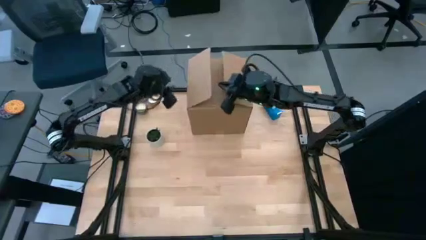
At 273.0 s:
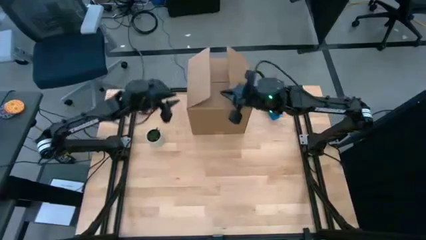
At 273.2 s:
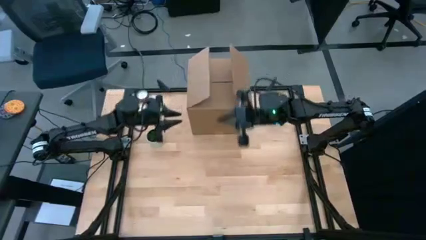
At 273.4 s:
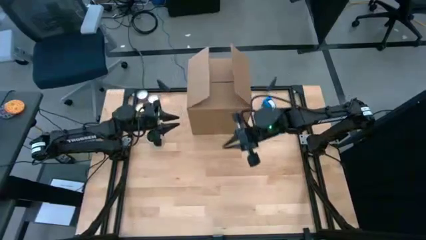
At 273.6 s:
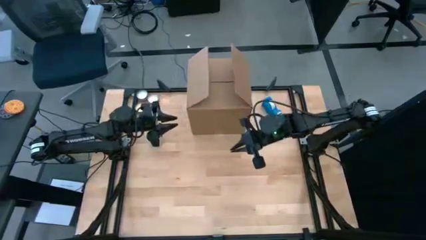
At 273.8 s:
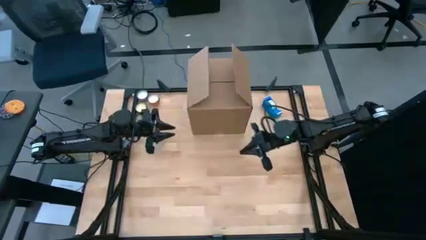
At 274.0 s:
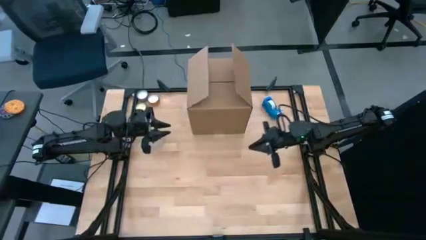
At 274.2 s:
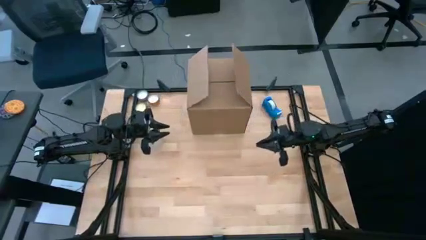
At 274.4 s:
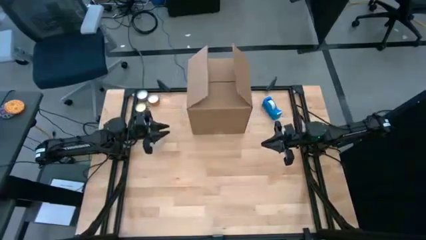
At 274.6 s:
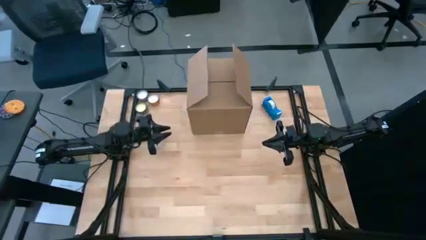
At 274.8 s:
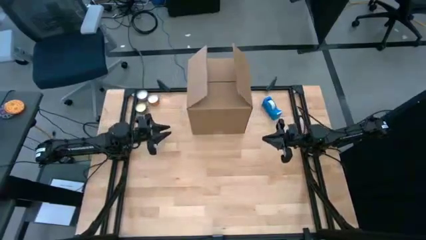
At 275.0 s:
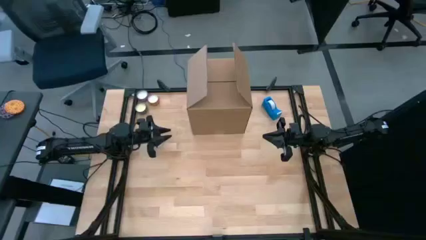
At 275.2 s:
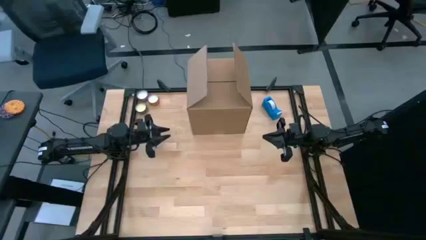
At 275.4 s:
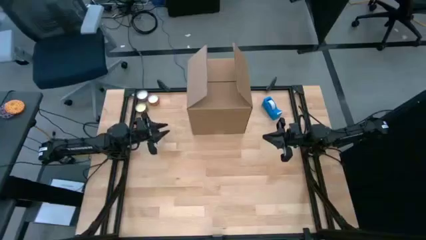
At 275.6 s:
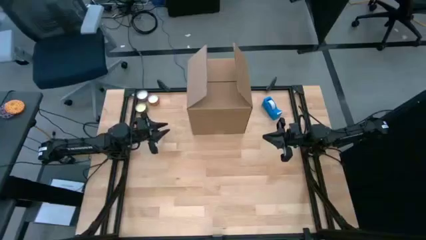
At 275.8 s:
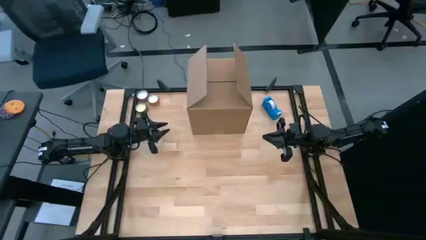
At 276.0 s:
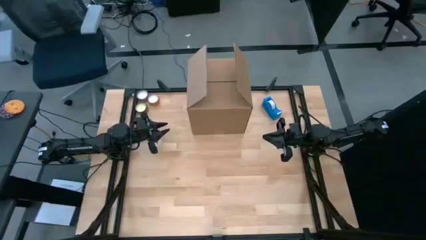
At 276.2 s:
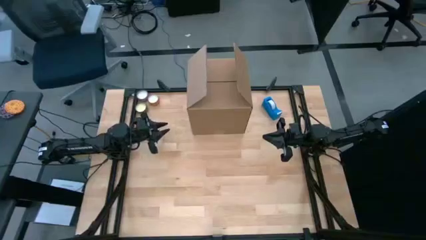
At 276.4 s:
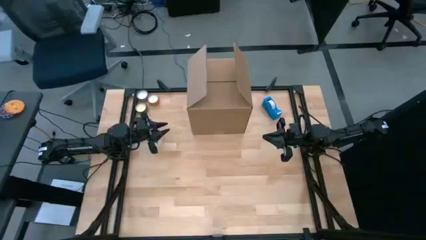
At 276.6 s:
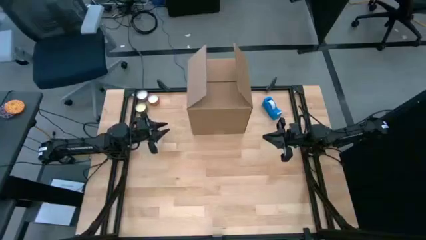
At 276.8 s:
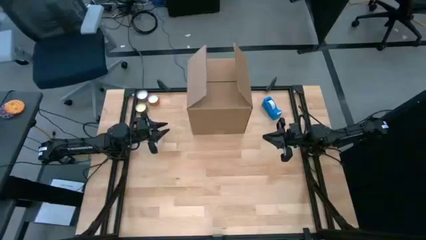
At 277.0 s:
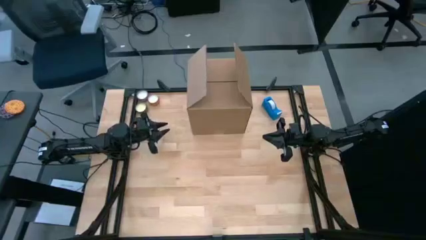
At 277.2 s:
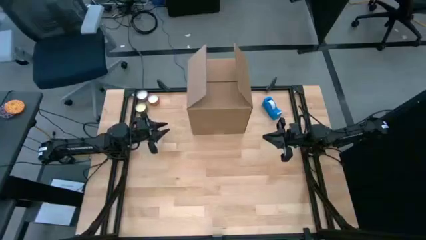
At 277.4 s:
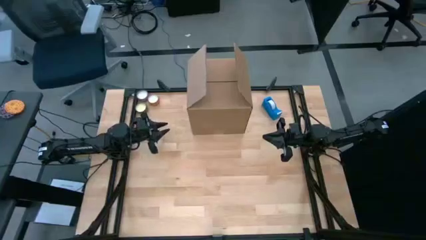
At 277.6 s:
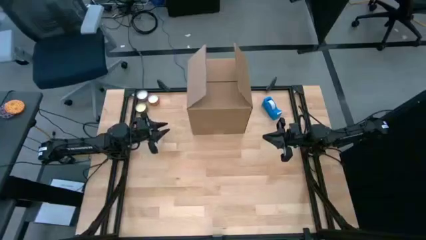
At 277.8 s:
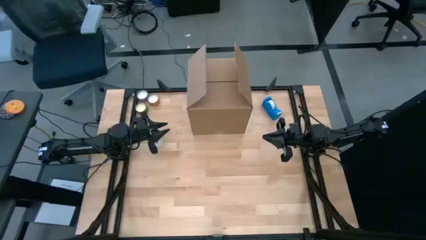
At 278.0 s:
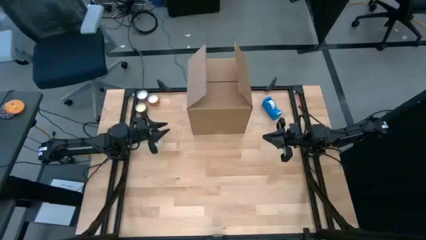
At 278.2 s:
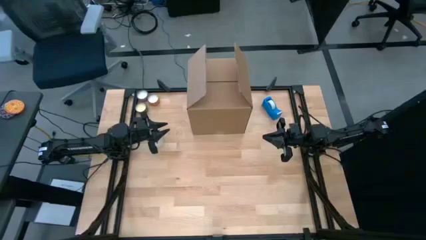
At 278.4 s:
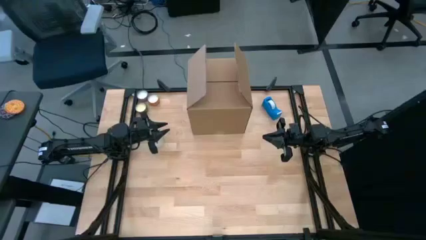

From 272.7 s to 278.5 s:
Task: wrap mug
Return to Home Position

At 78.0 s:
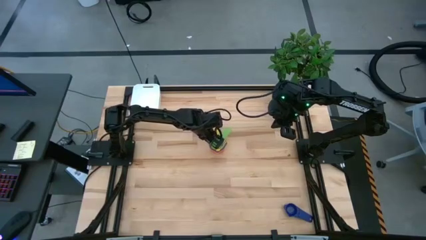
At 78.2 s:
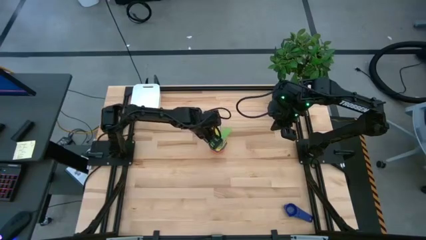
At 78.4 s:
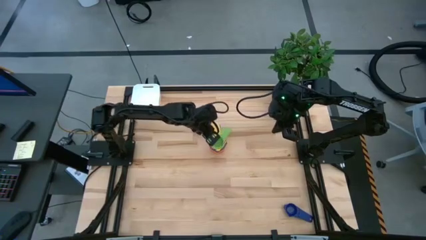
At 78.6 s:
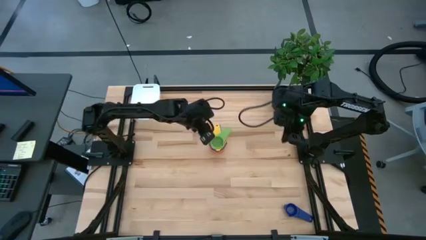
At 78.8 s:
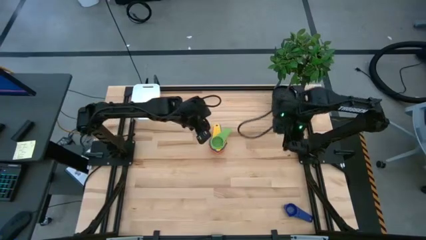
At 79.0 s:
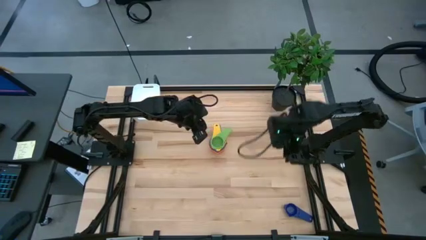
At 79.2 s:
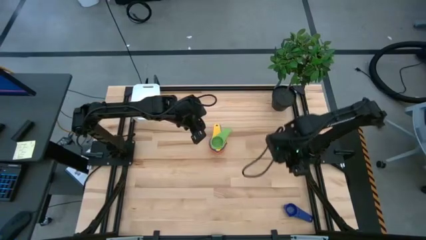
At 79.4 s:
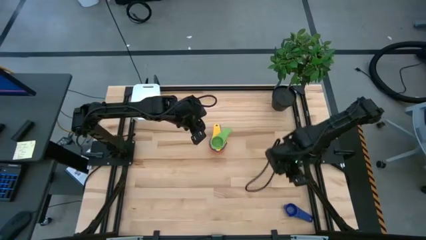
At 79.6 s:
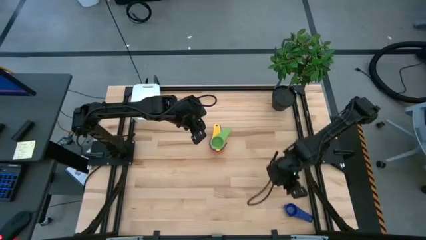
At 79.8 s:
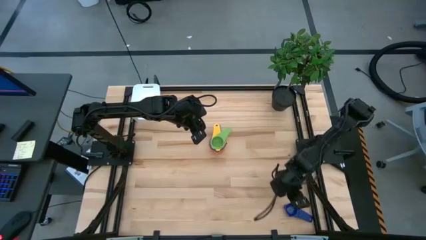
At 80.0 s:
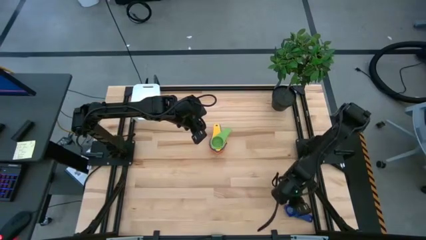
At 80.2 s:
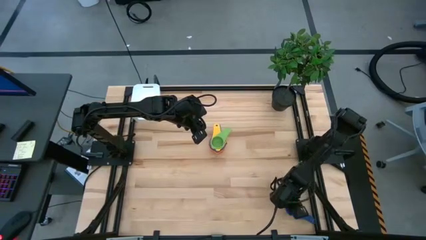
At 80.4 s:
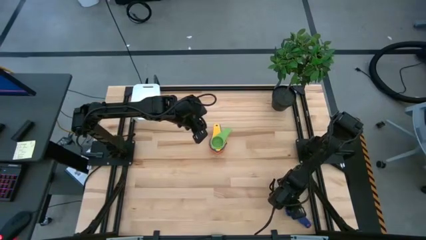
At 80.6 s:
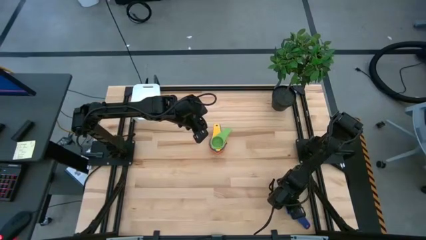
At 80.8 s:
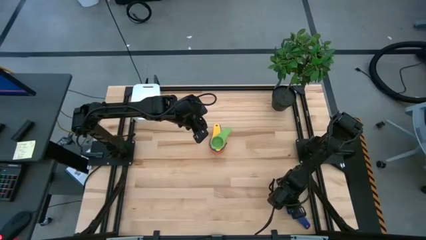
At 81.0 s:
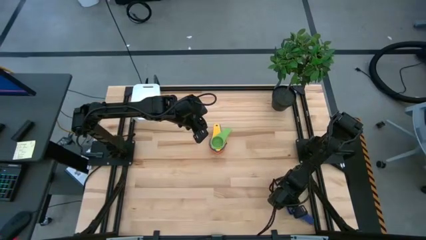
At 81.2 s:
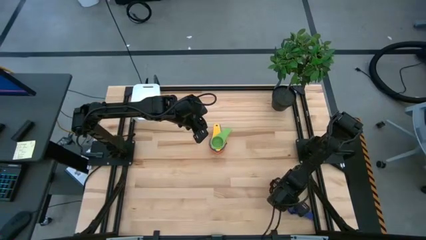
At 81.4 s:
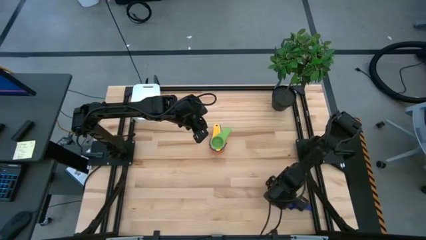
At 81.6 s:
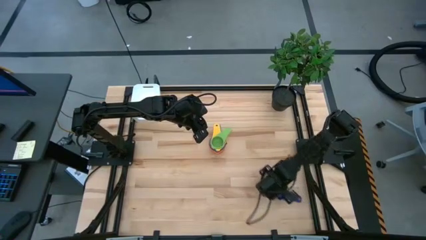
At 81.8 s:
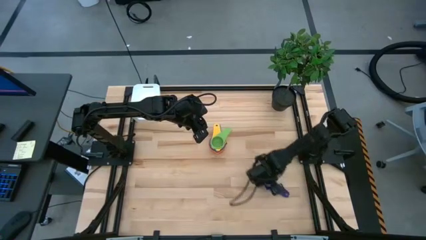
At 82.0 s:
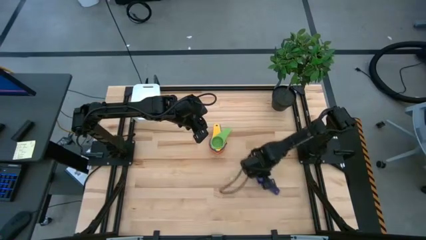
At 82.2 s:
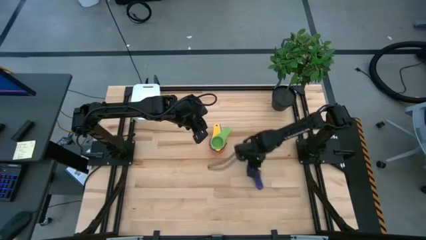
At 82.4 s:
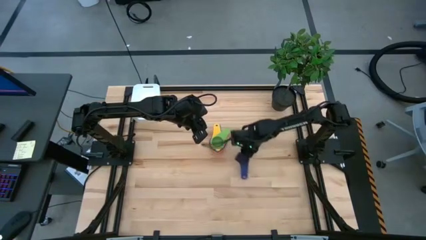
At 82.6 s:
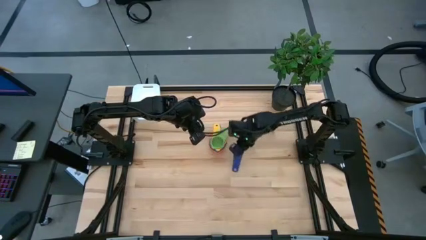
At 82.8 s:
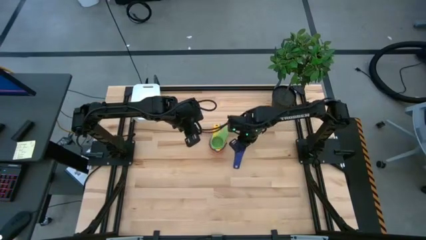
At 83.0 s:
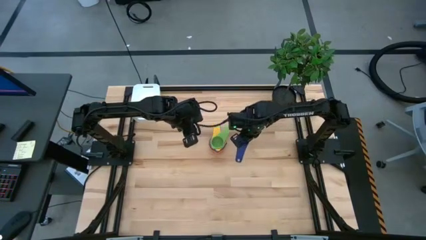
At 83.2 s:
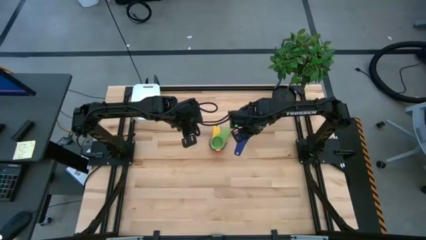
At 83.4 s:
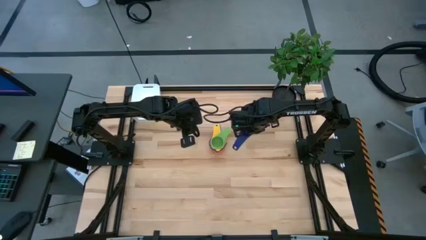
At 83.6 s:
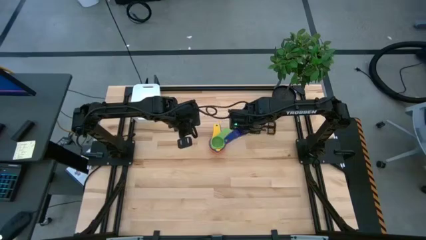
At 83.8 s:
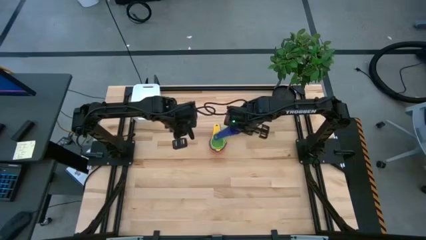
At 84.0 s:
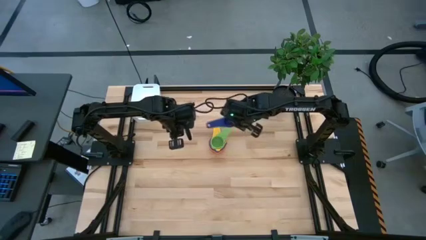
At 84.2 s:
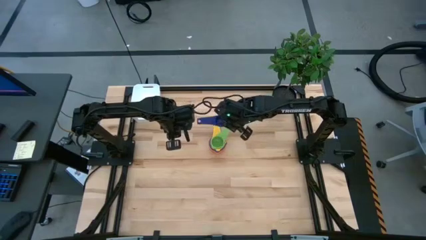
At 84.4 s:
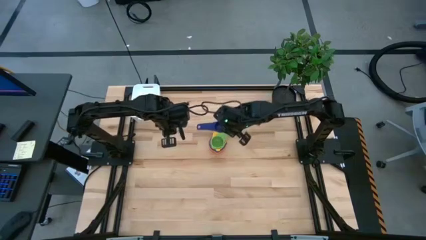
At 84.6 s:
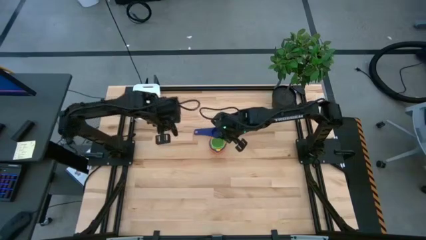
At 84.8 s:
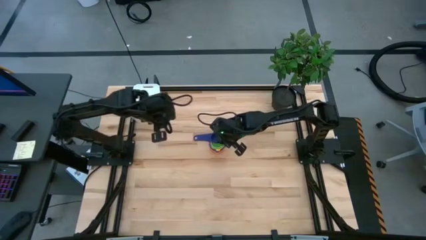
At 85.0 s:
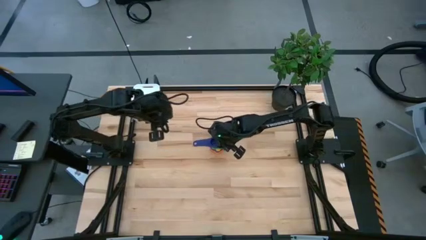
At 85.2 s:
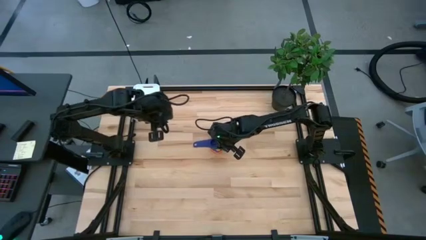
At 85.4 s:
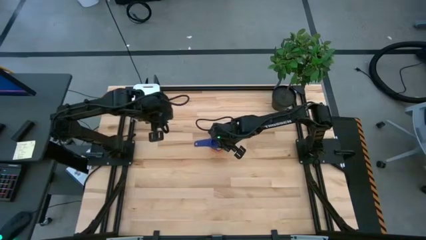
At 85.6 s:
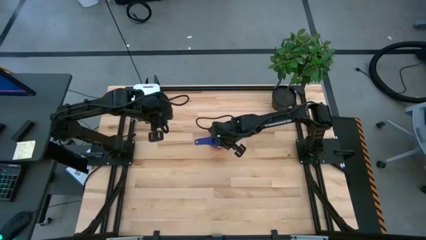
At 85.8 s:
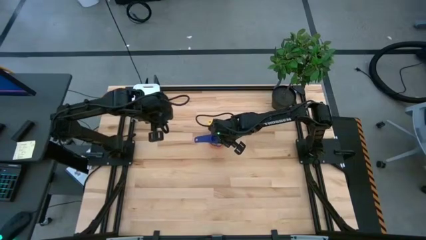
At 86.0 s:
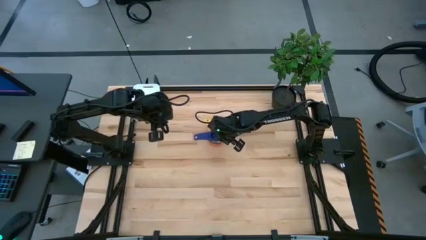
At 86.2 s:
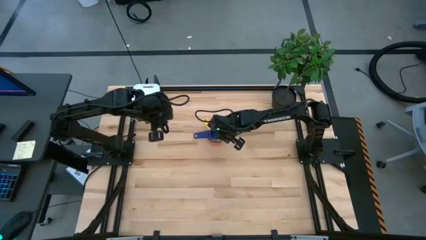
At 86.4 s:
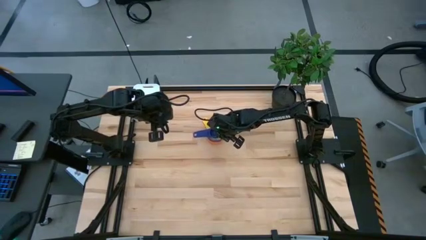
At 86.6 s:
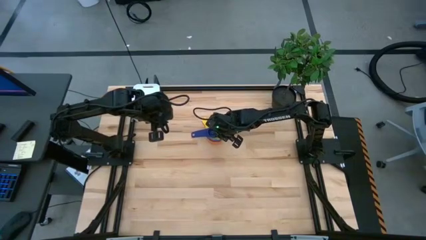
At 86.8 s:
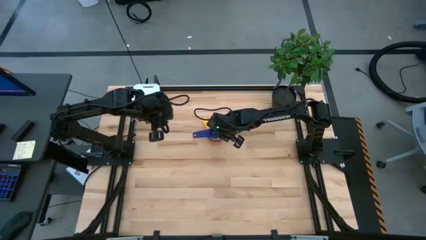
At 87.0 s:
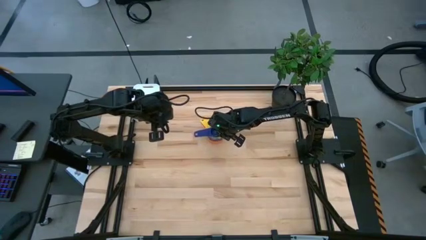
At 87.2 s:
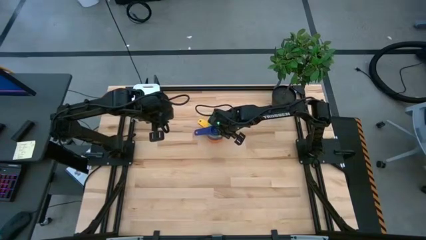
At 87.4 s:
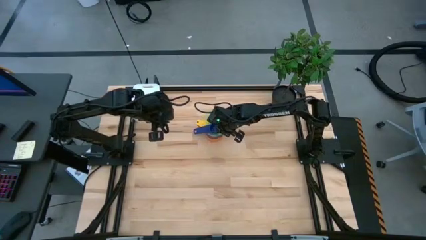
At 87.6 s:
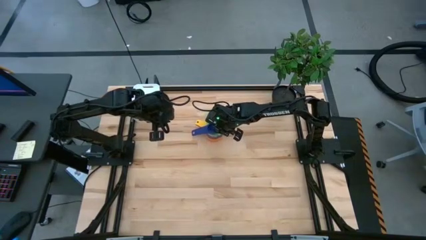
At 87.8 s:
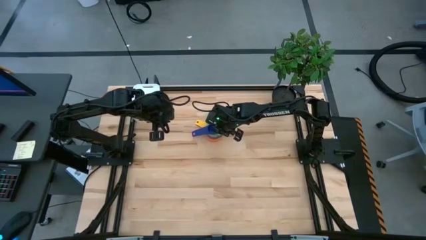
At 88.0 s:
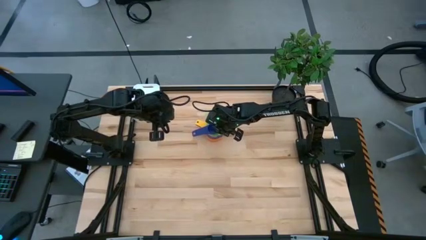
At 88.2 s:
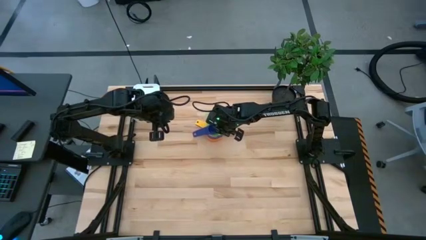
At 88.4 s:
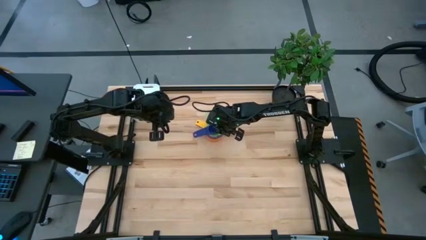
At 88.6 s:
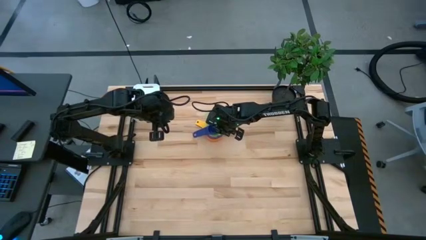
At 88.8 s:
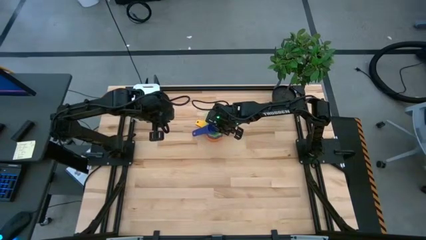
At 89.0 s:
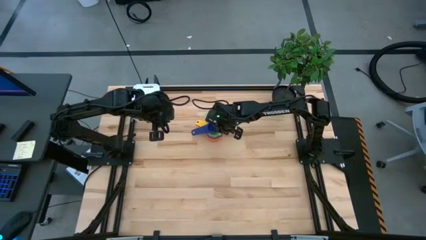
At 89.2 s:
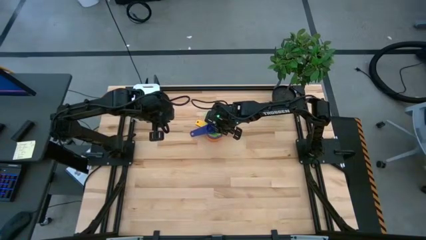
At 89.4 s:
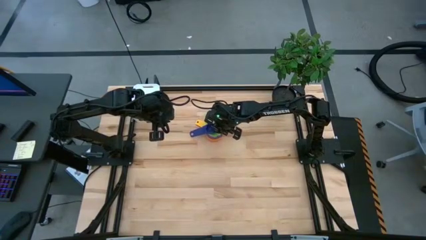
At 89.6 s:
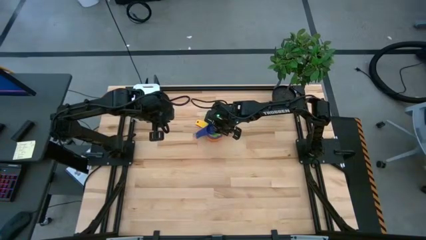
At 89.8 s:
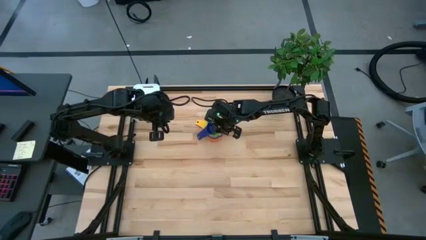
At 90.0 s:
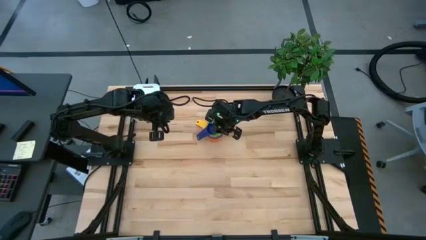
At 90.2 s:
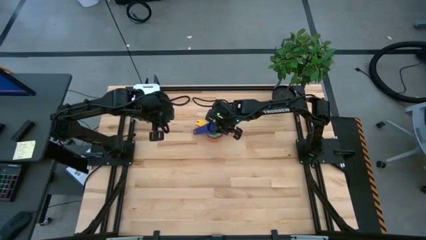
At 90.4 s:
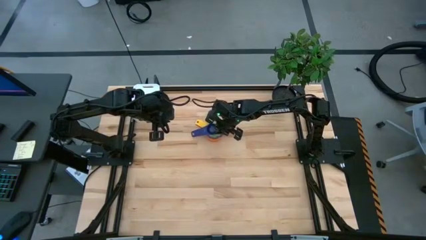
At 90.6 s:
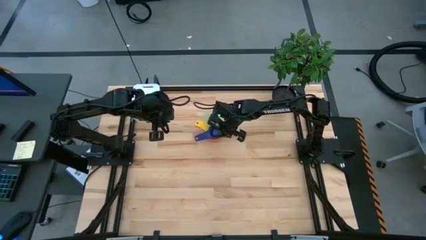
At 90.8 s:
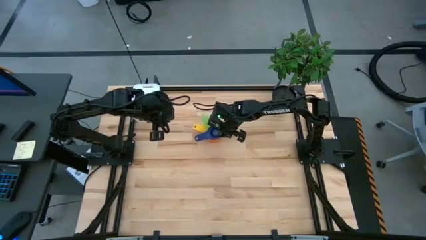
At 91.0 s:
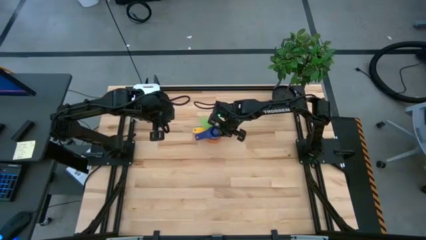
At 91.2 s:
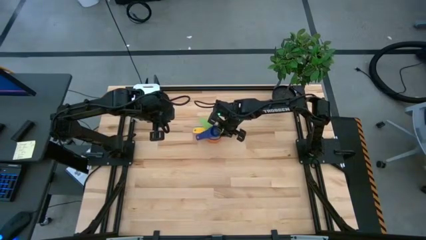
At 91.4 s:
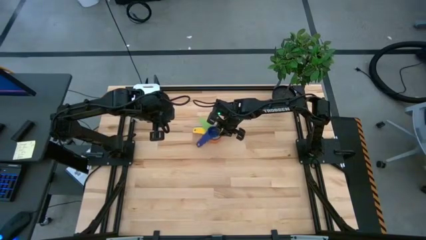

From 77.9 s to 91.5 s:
Task: Nest measuring cups in basket
Stack the dark blue measuring cup on top of the green measuring cup
